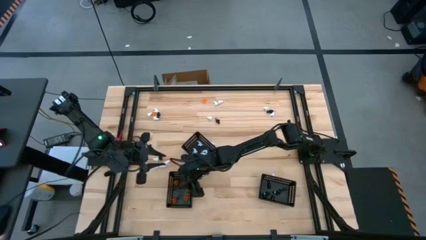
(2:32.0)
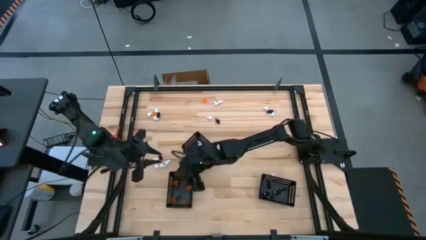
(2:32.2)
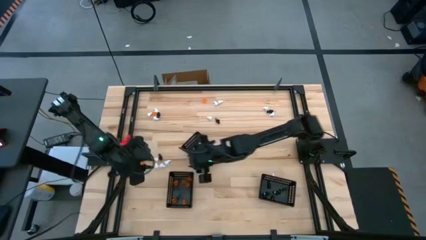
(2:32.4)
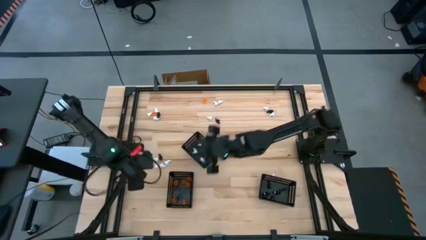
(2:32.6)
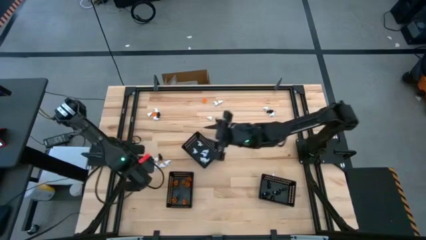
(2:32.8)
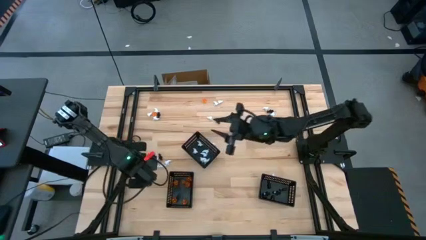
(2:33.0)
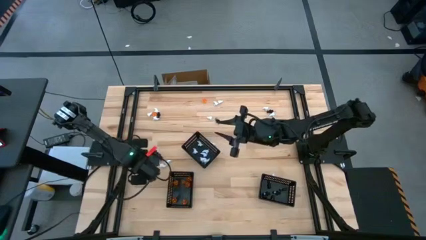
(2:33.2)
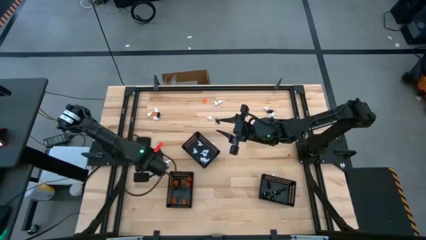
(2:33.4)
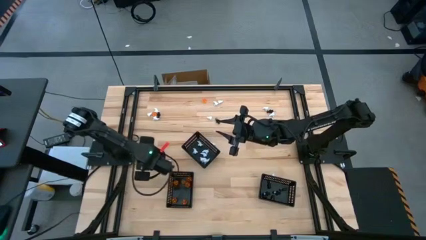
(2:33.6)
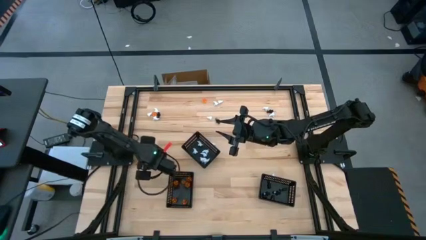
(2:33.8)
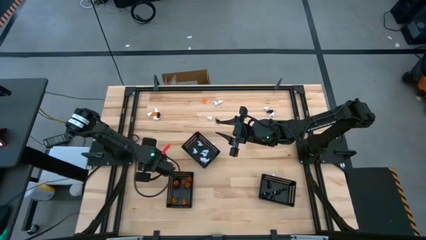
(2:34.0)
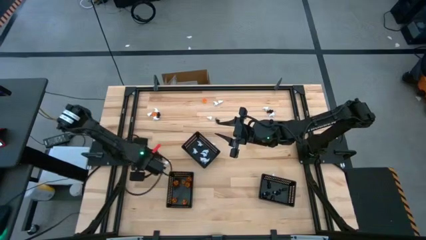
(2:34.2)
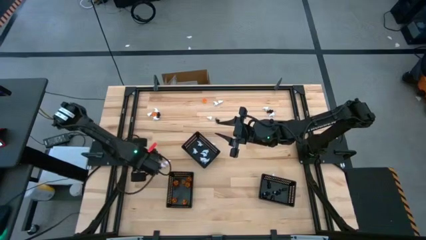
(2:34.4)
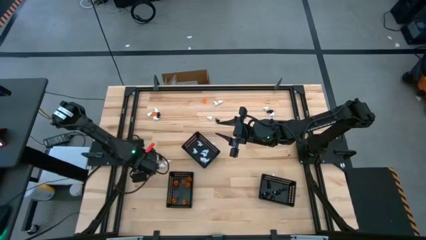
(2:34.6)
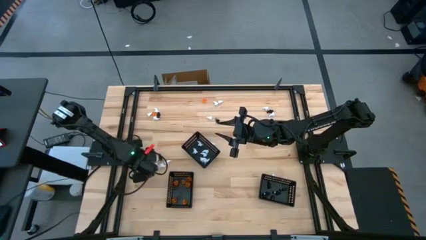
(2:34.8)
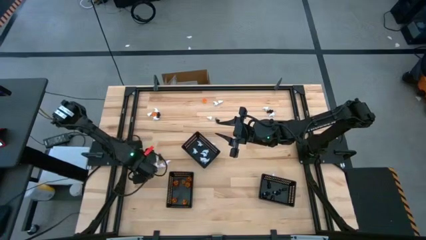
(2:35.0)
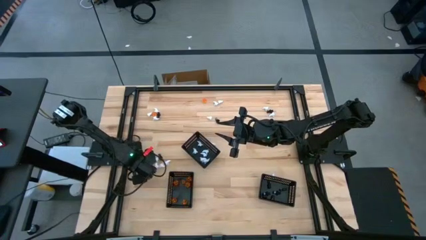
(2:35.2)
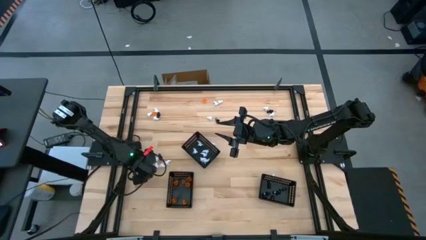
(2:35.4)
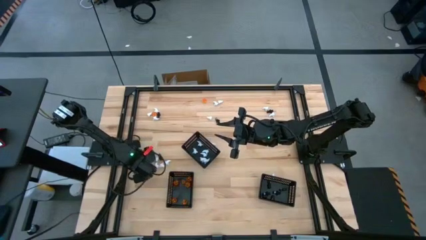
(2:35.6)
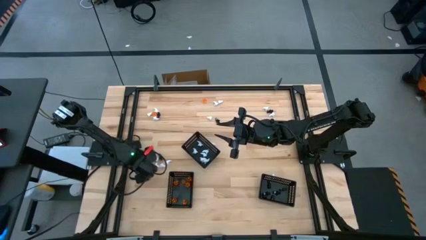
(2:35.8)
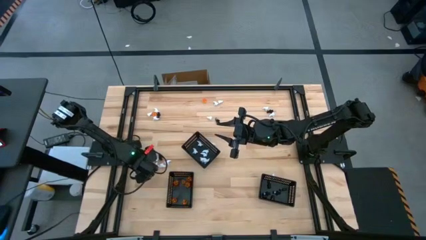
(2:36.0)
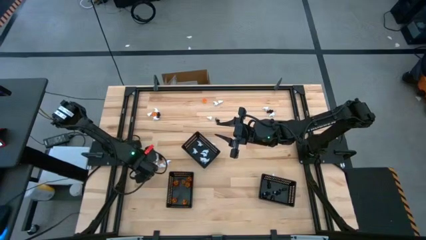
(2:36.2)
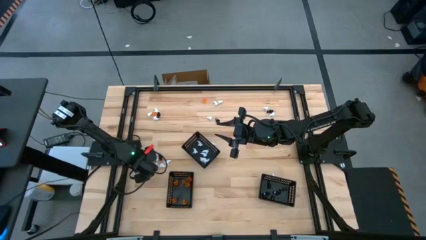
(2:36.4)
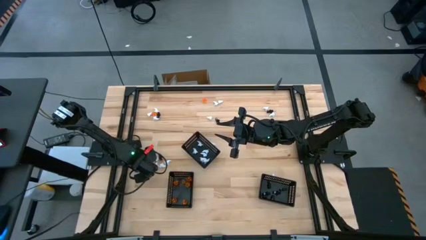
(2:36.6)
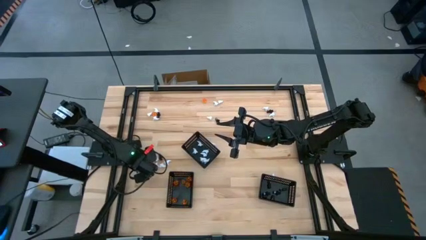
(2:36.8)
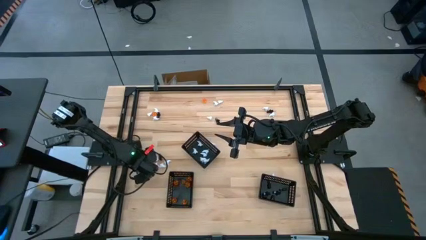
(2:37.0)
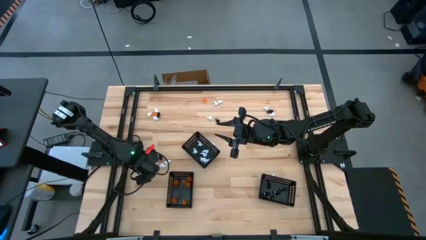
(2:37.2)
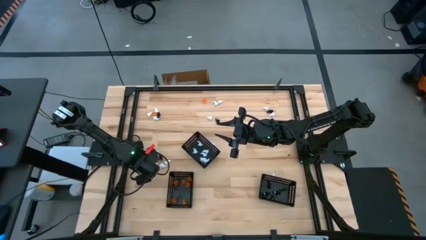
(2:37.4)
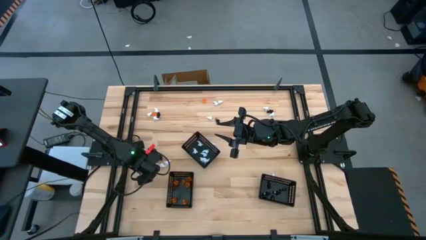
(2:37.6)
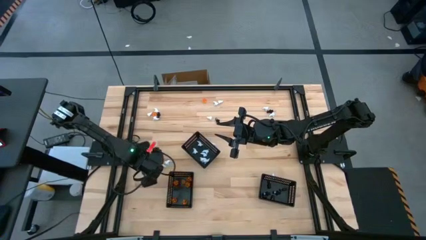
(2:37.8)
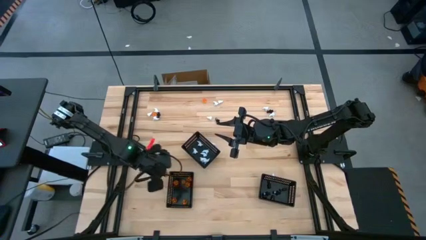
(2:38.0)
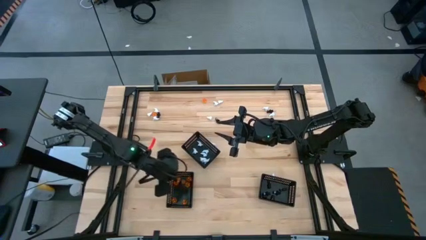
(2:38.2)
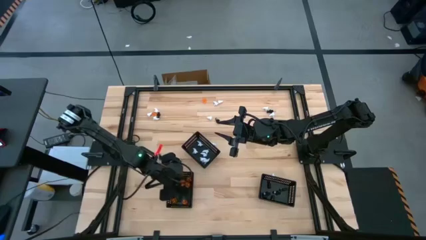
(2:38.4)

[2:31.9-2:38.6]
Task: Sort Halloween decoration
Put the orange pumpkin toy into the left black basket

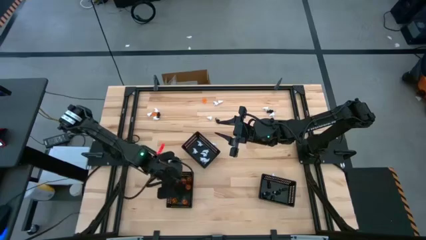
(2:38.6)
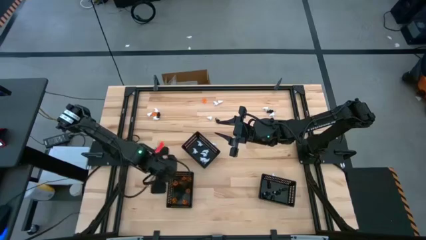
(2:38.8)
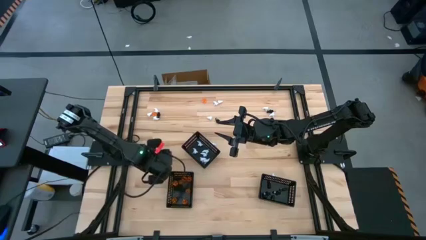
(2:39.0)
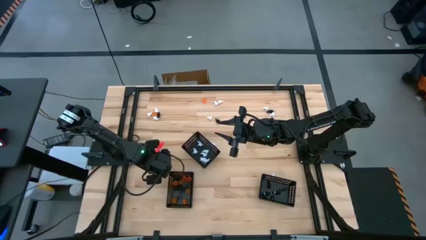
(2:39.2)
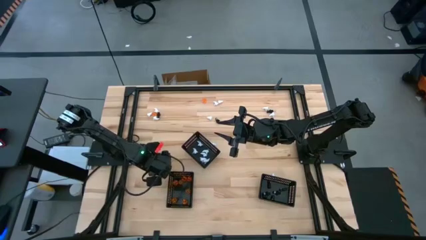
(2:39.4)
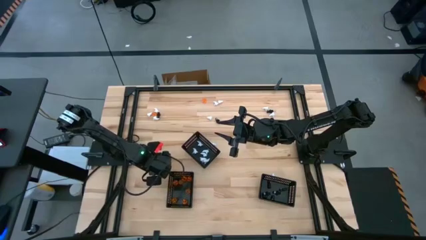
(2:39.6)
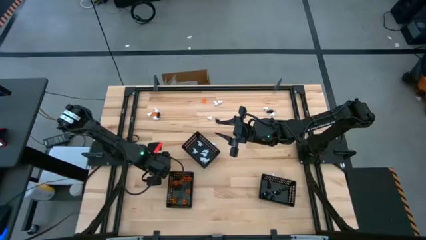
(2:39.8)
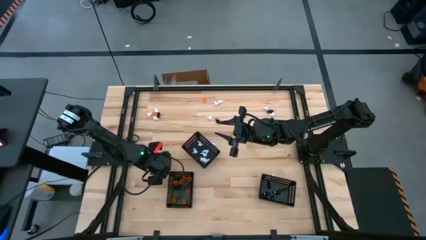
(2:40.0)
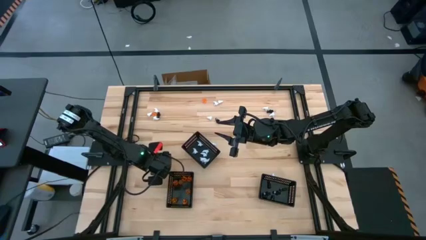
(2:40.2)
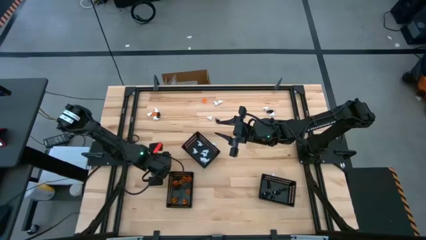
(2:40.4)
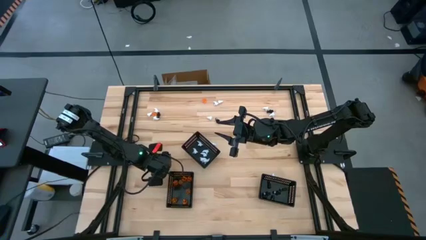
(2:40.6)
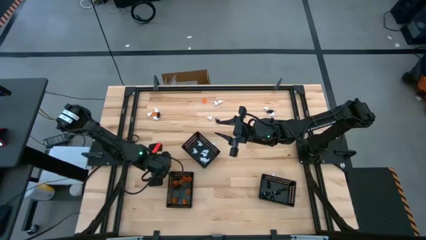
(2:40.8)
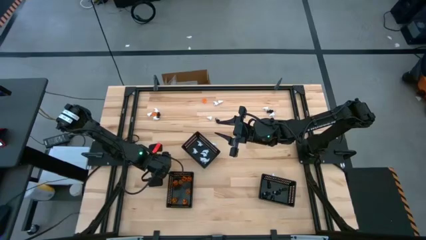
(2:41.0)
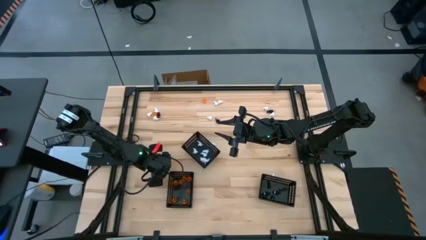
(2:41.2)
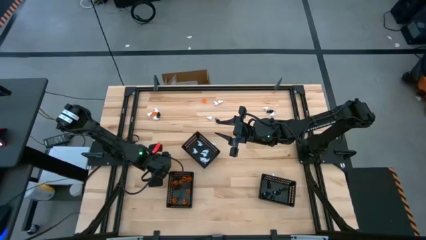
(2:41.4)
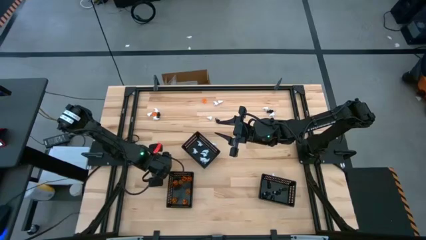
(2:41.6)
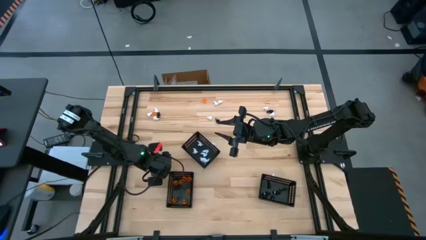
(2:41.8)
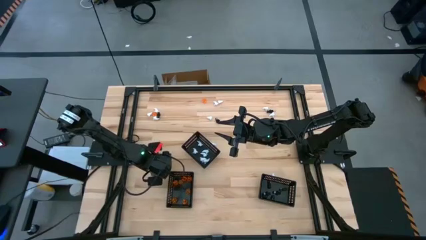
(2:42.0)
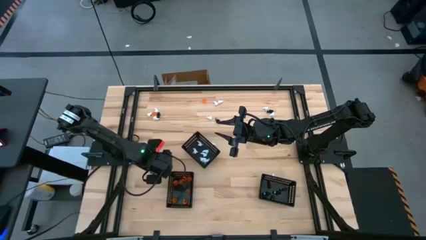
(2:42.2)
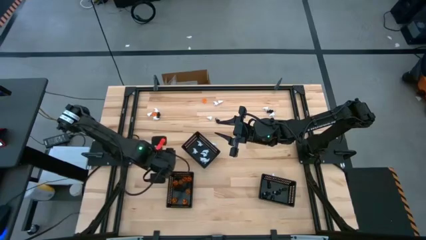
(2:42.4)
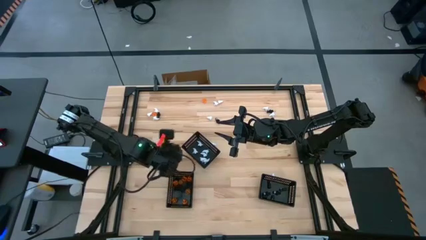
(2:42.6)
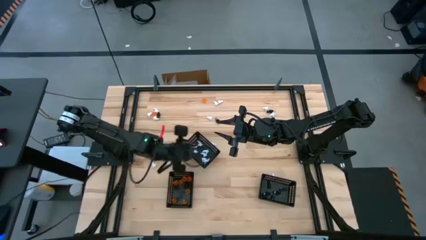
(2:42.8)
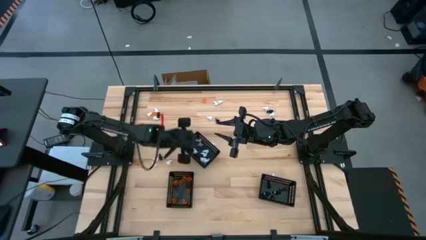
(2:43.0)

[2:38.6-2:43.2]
Put the white ghost toy into the middle black basket

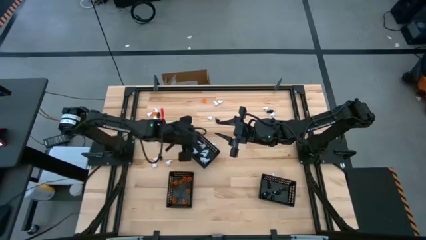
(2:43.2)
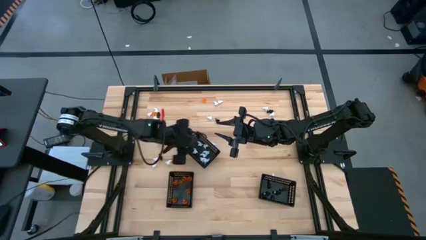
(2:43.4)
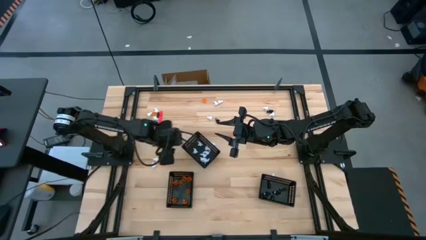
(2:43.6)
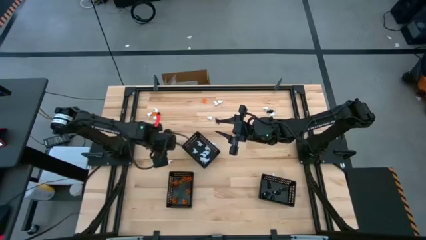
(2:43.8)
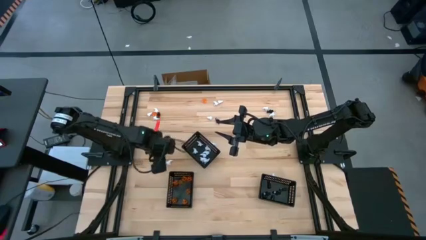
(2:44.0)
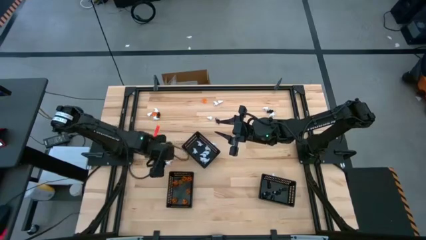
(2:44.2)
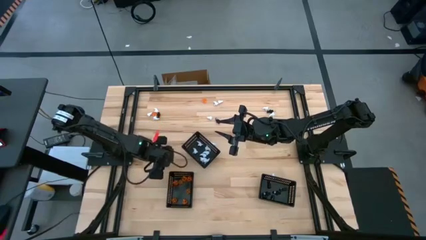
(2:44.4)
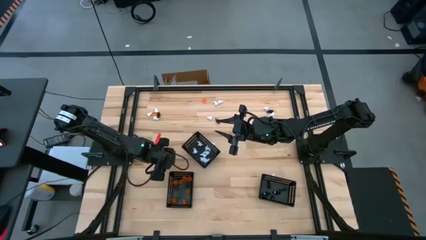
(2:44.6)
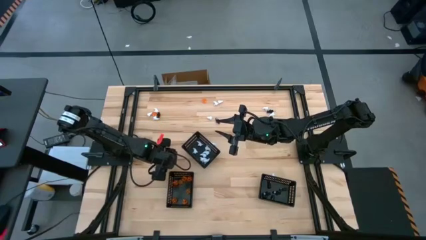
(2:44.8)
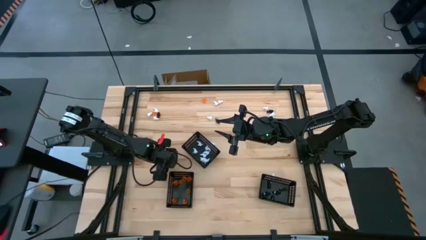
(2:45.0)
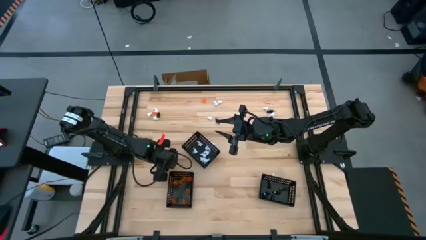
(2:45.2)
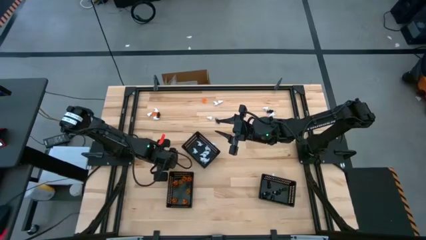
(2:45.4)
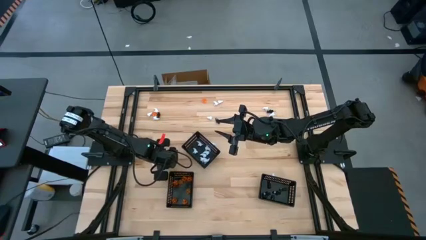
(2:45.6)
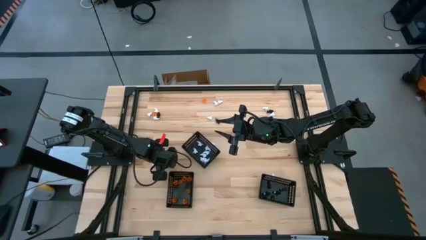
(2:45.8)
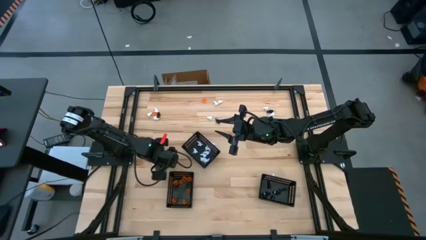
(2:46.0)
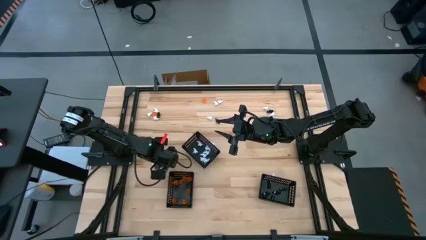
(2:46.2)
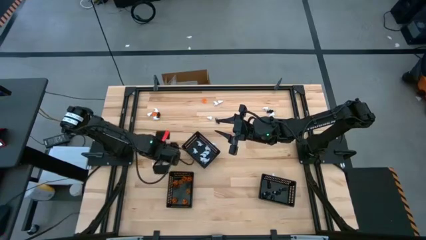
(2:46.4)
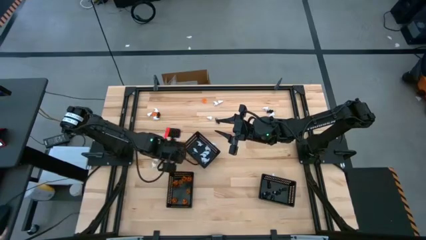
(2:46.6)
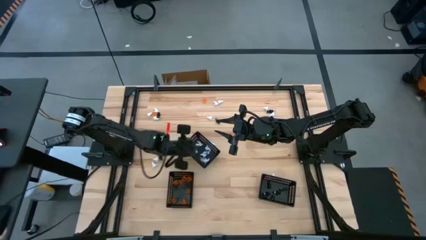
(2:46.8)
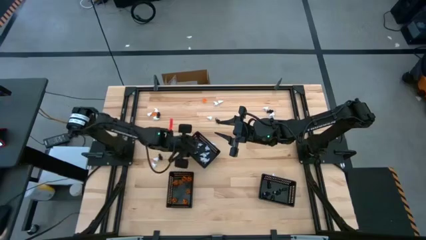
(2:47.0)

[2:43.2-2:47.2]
Put the white ghost toy into the middle black basket
